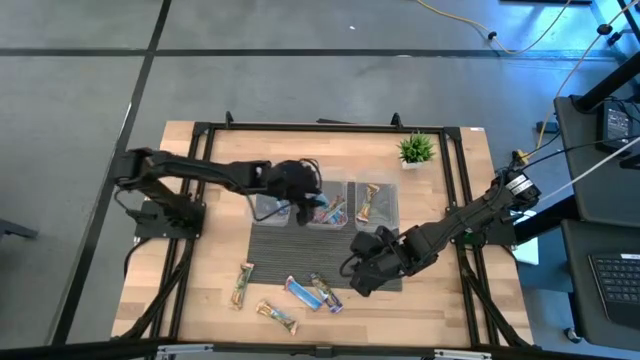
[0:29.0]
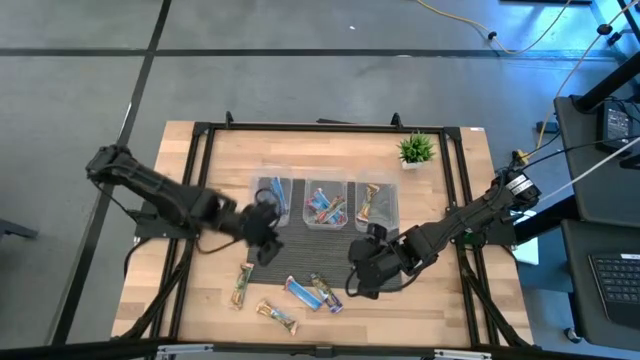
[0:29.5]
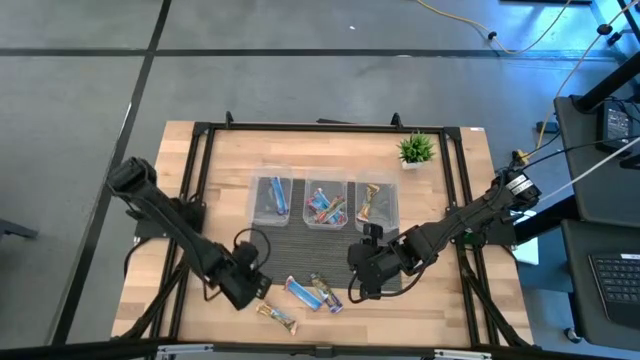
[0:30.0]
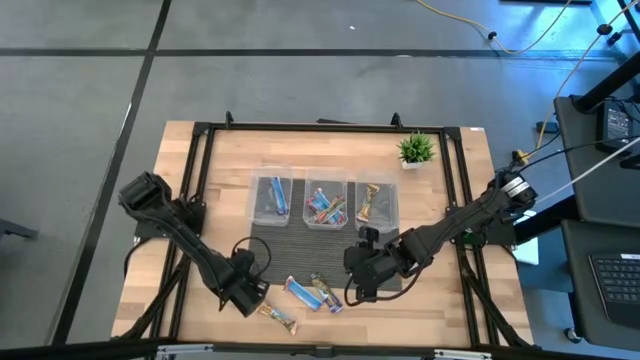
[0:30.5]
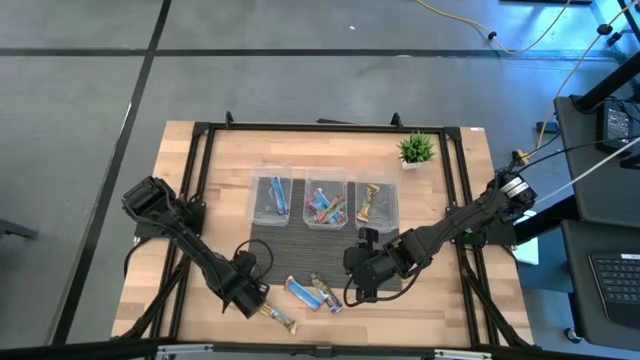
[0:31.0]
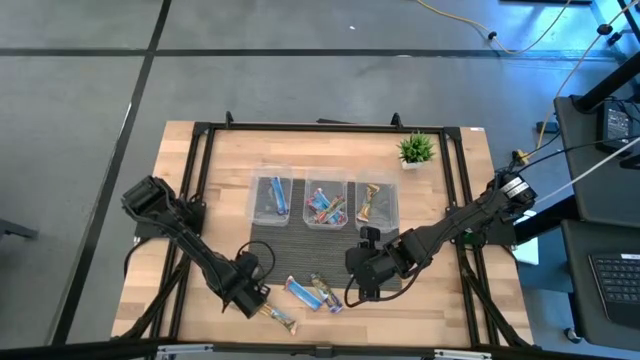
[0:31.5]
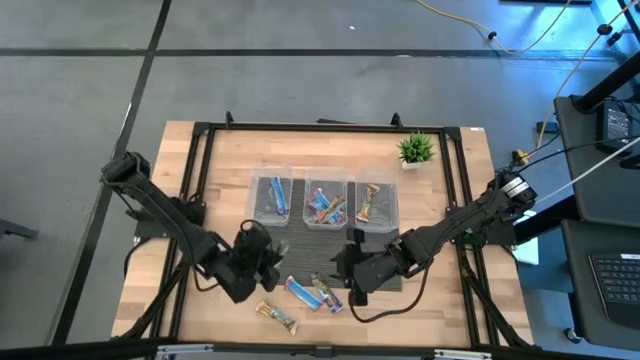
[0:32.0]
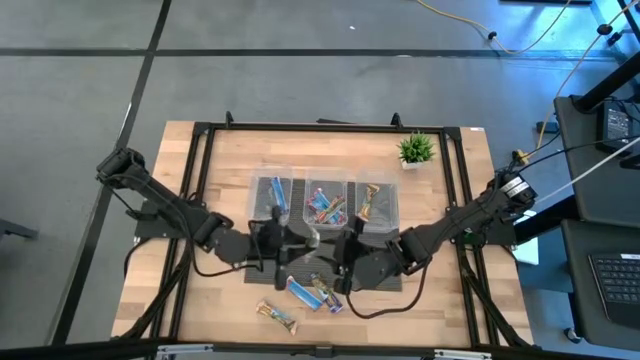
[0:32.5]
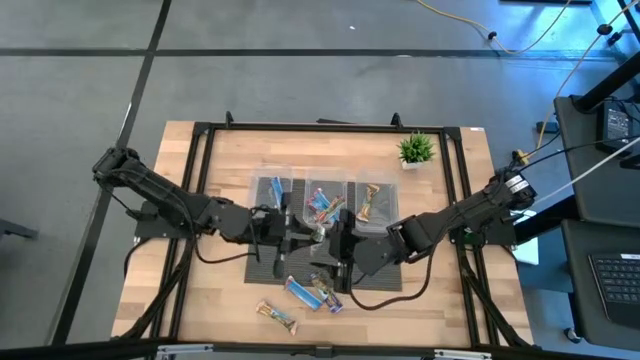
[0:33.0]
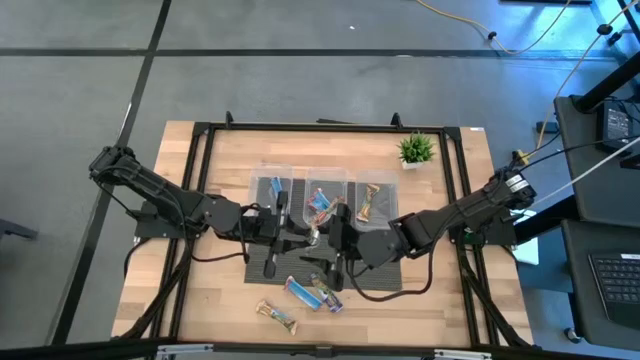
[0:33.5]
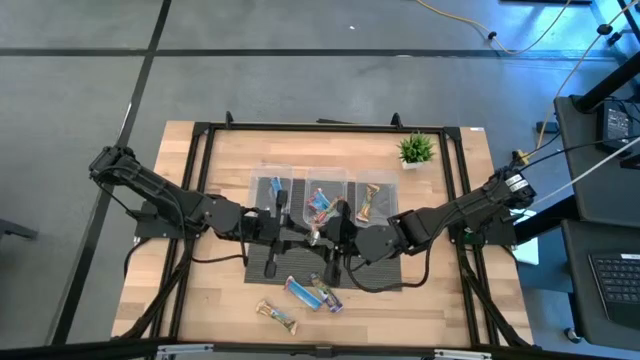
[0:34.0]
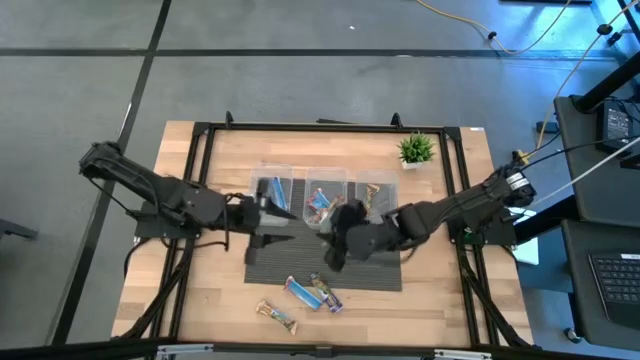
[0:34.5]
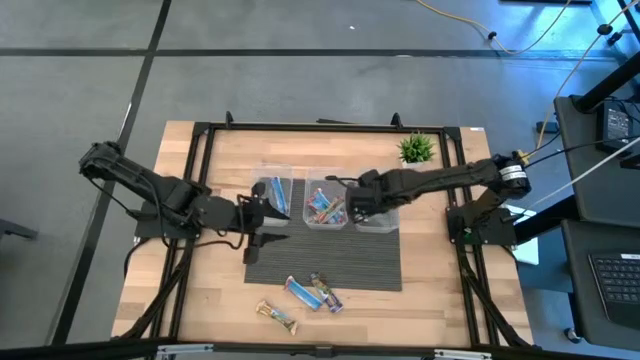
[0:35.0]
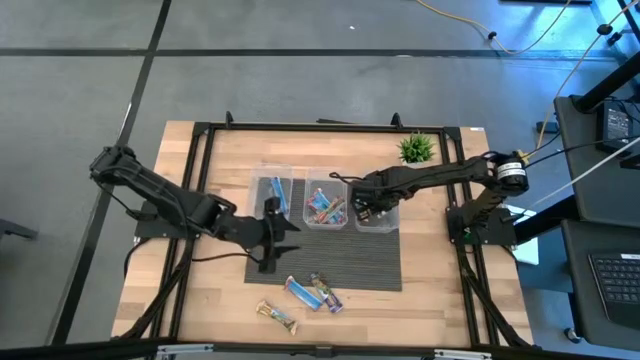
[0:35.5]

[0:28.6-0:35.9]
Task: Pick and place Granola Bars by type
Put the yellow granola bar into the right transparent bin

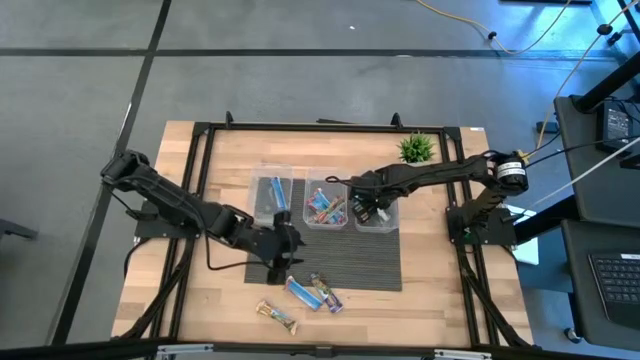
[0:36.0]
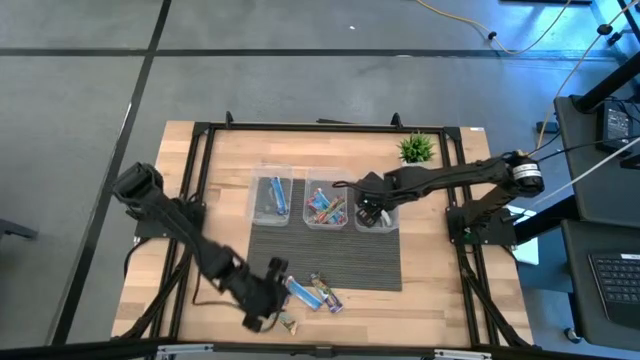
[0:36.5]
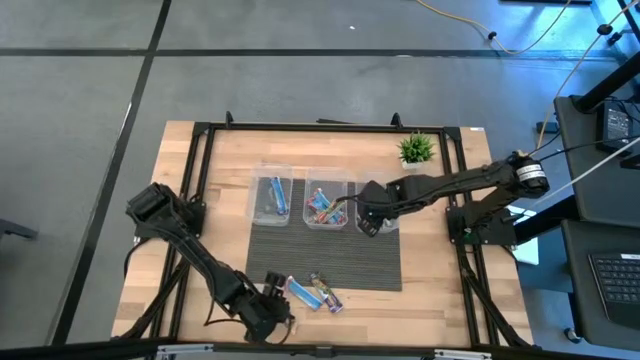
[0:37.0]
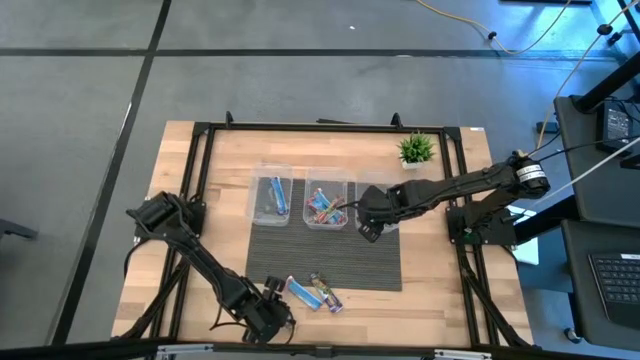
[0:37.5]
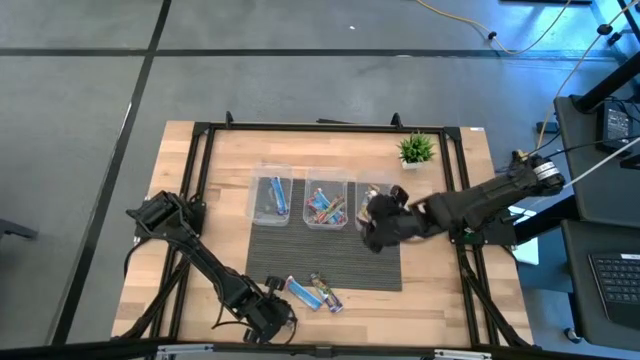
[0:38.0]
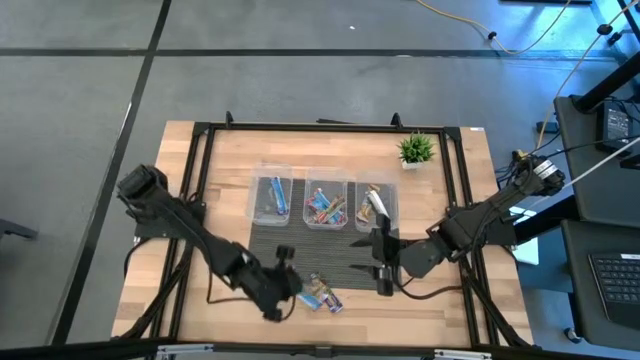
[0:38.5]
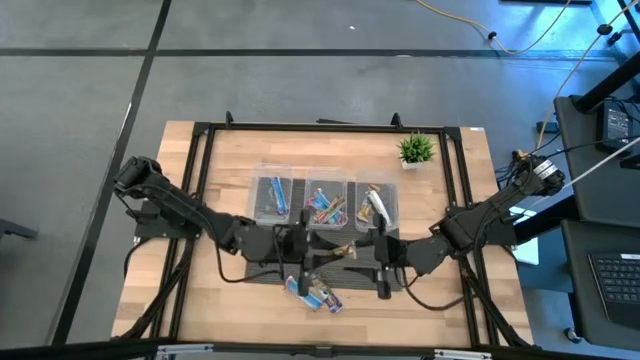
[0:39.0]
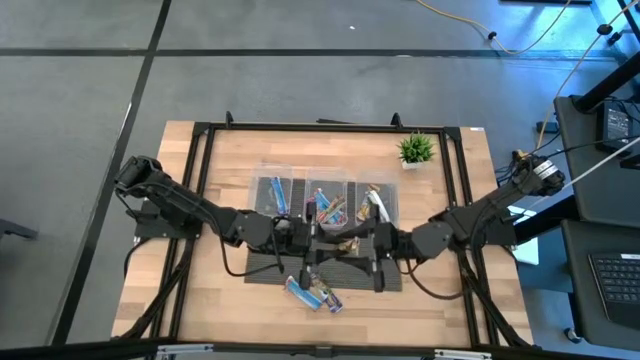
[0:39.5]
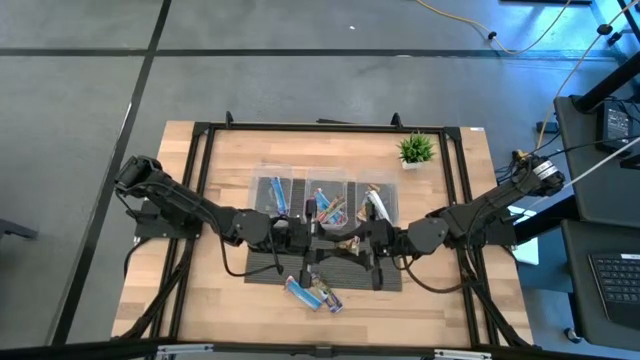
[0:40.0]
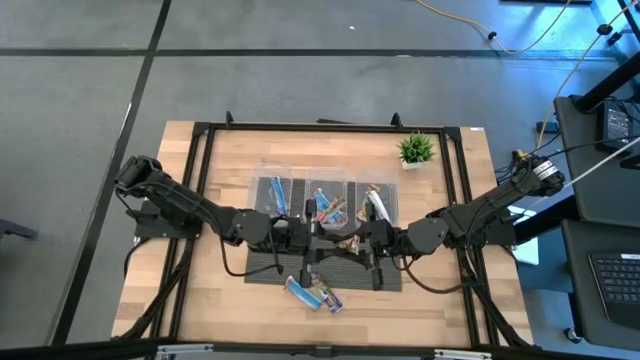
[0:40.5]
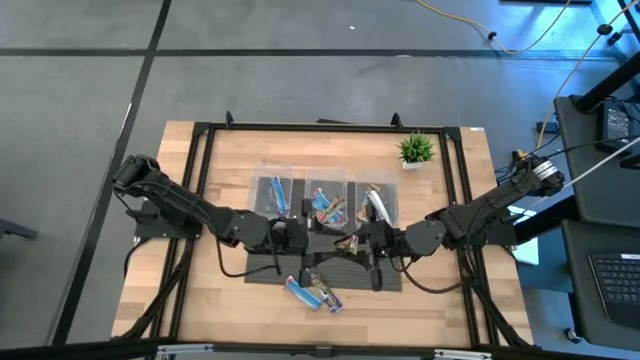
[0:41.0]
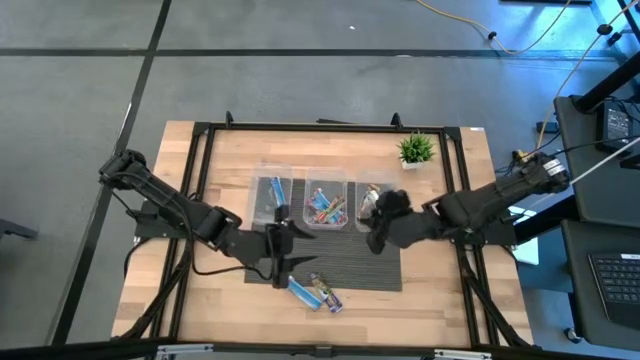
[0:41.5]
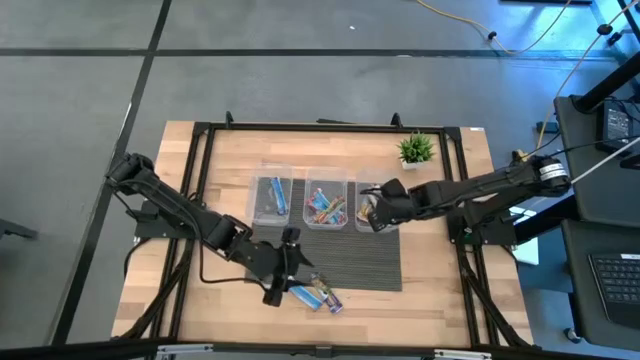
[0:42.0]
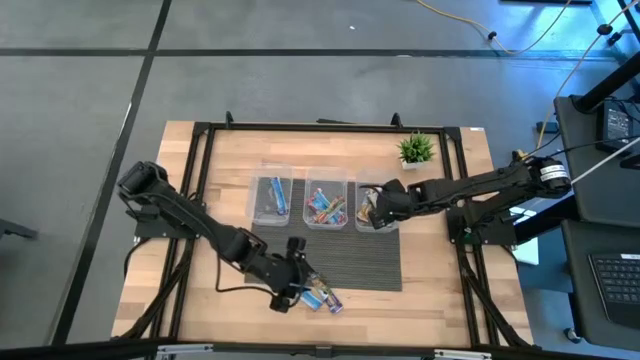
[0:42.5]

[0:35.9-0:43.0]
Put the yellow granola bar into the right transparent bin

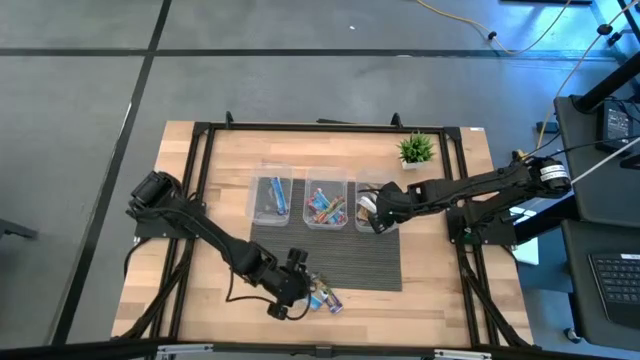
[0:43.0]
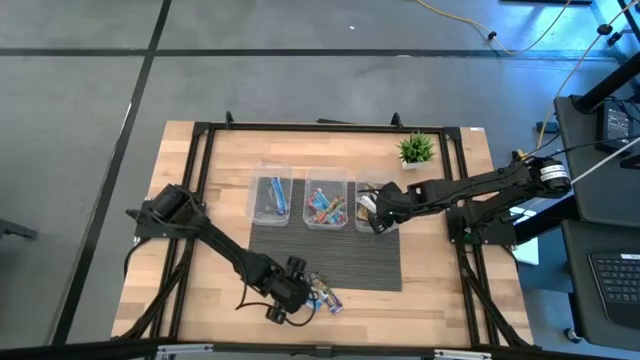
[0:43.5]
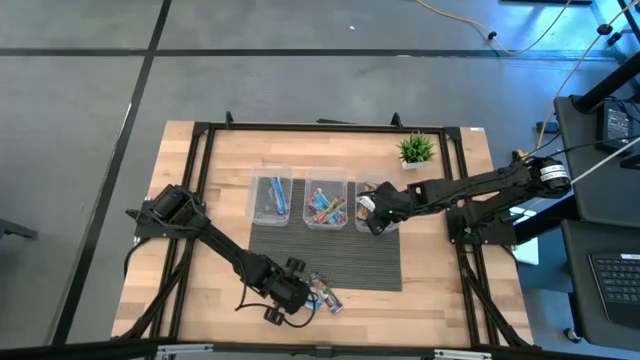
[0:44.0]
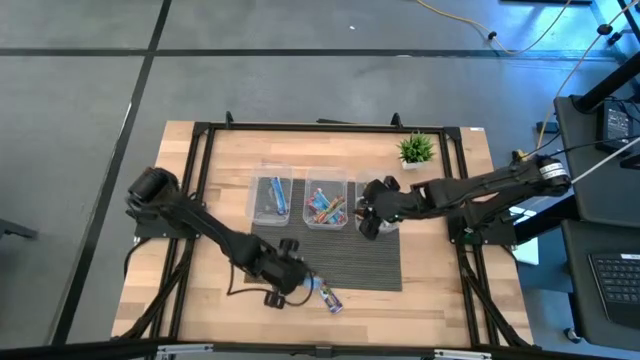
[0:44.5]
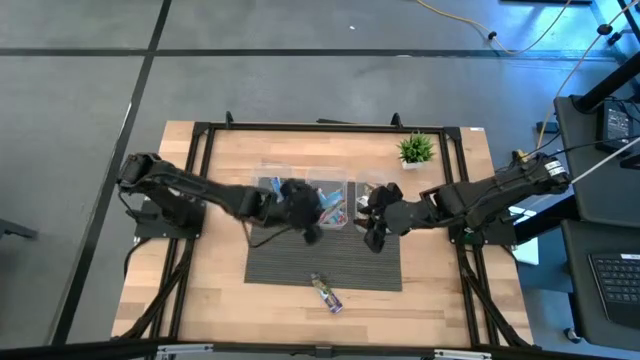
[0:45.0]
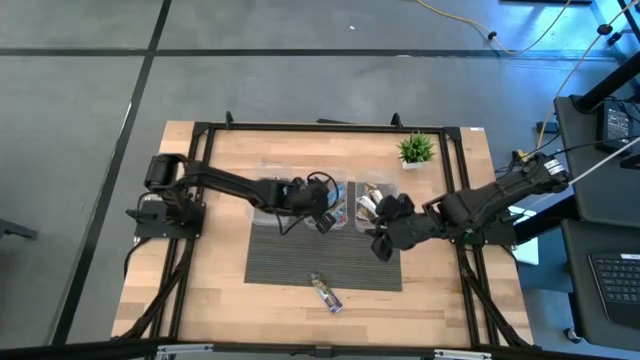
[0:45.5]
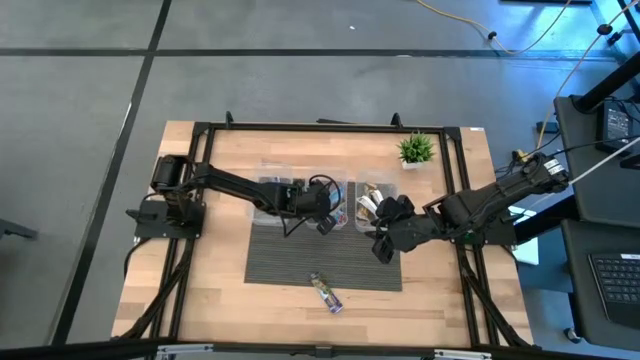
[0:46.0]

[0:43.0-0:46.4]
Put the red granola bar into the middle transparent bin

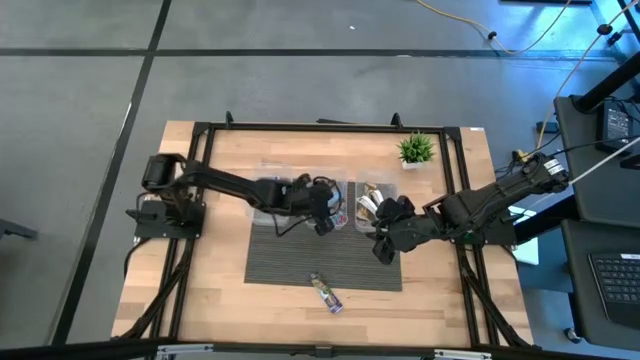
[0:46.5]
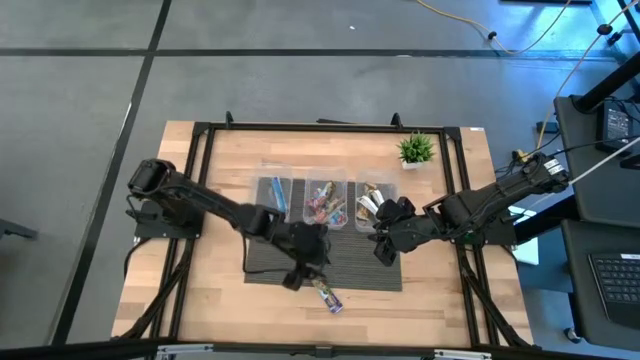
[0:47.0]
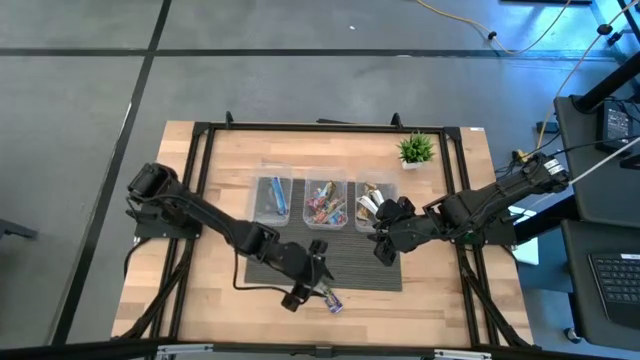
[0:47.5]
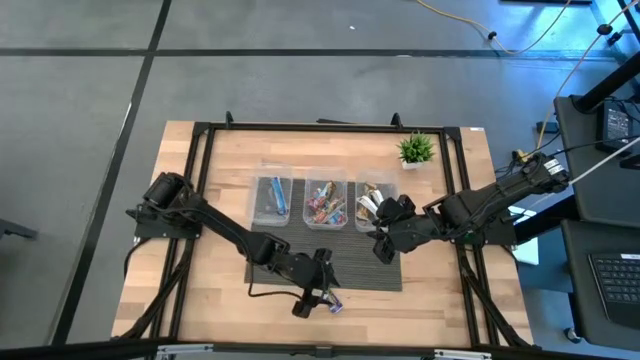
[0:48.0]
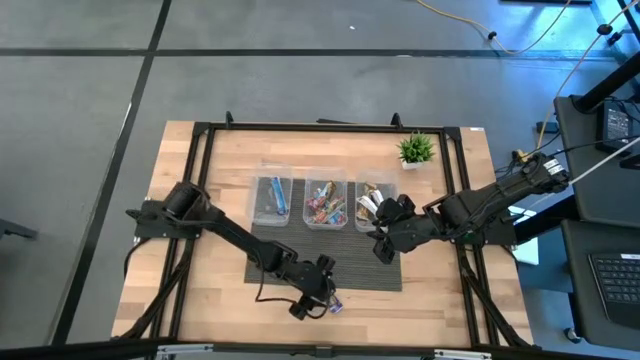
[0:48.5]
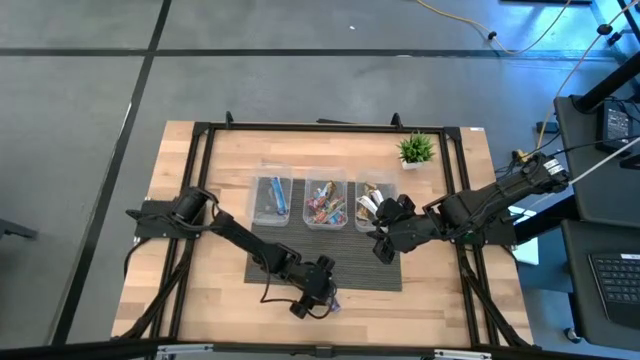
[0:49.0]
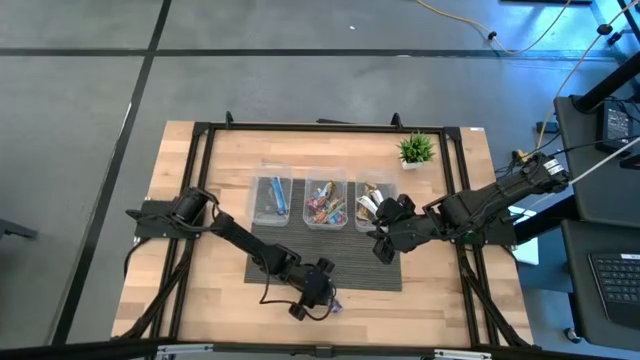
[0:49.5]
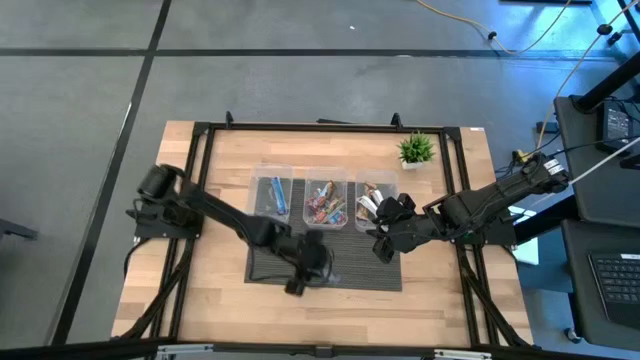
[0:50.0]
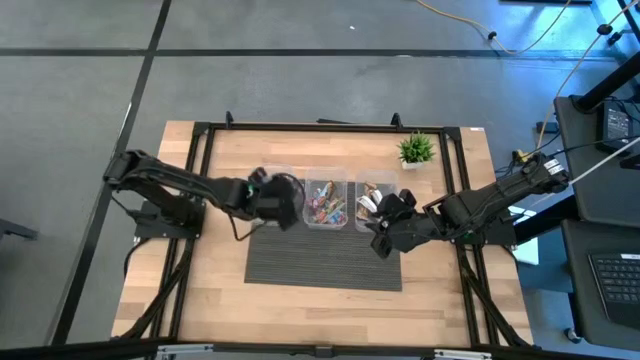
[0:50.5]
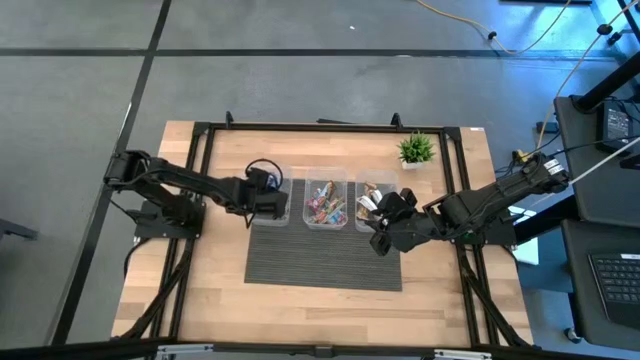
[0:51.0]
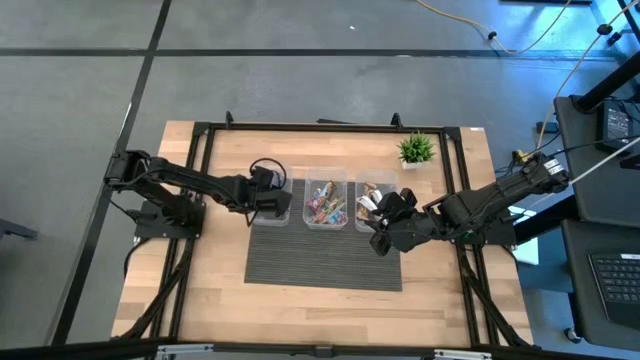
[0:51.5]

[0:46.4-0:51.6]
Put the blue granola bar into the left transparent bin
